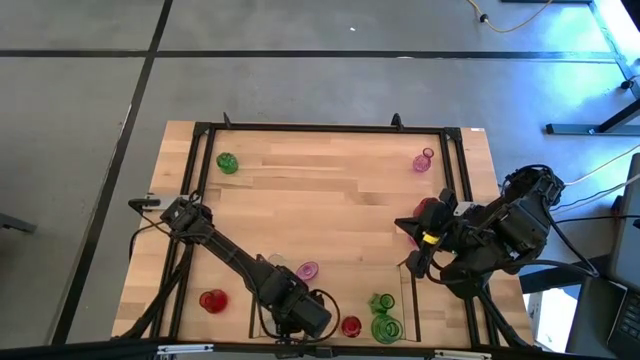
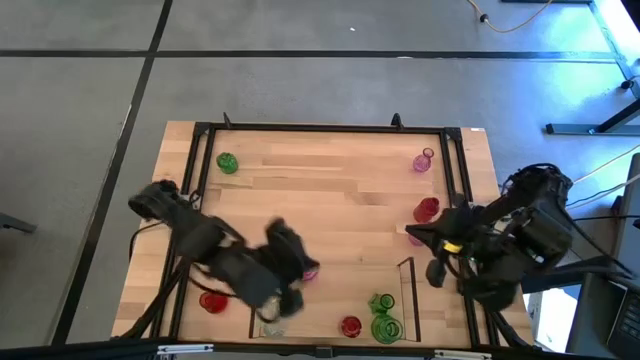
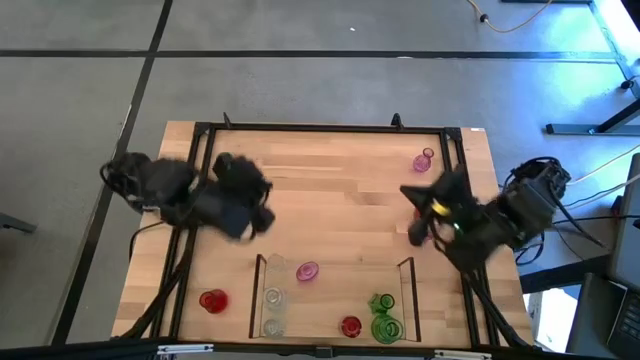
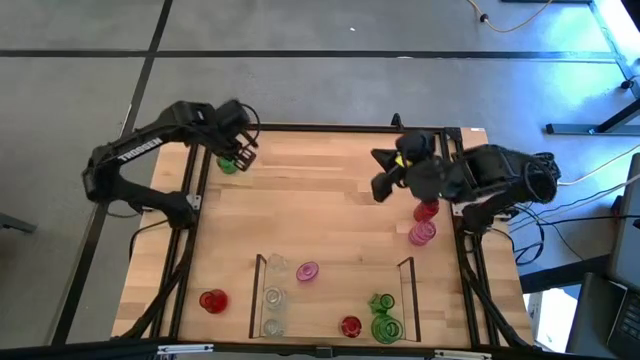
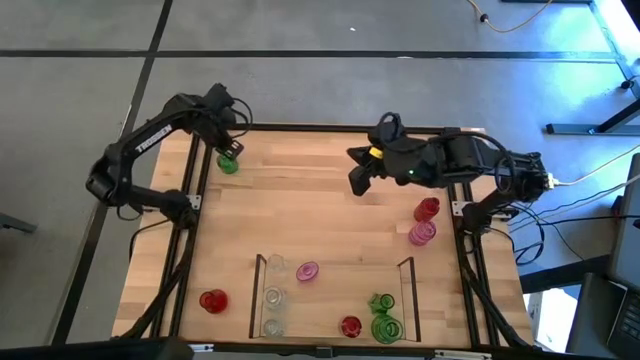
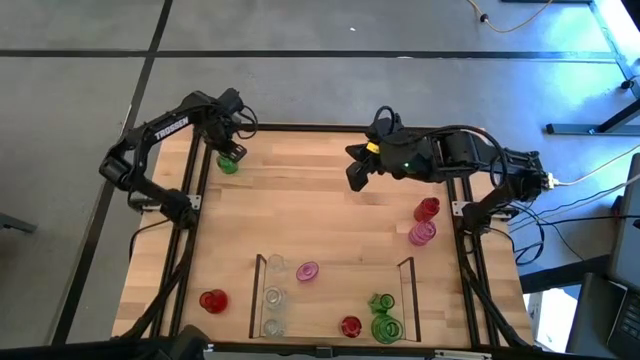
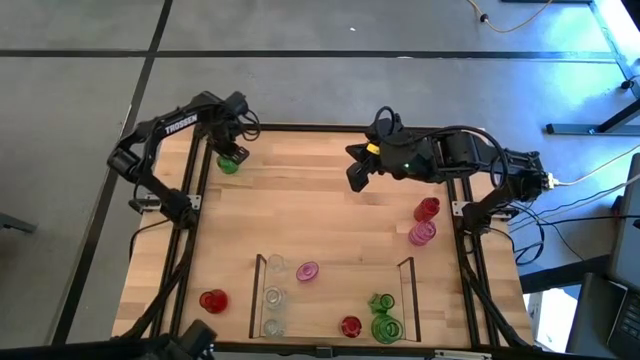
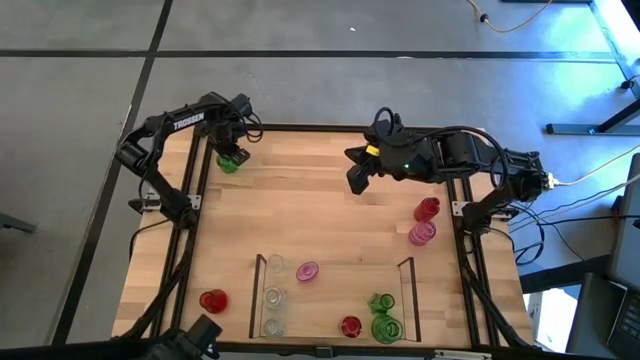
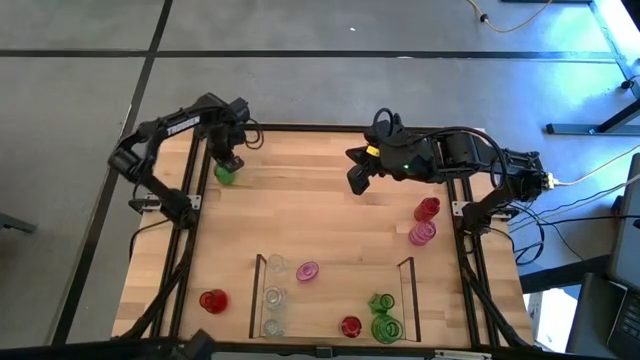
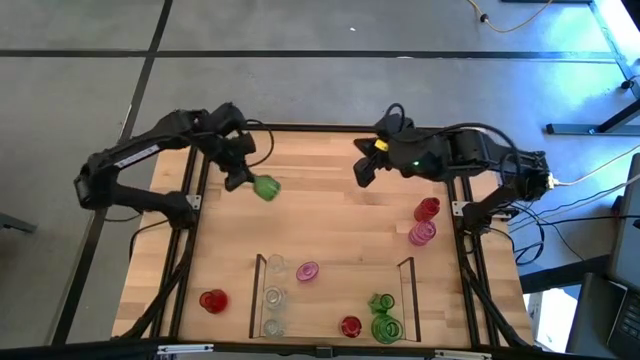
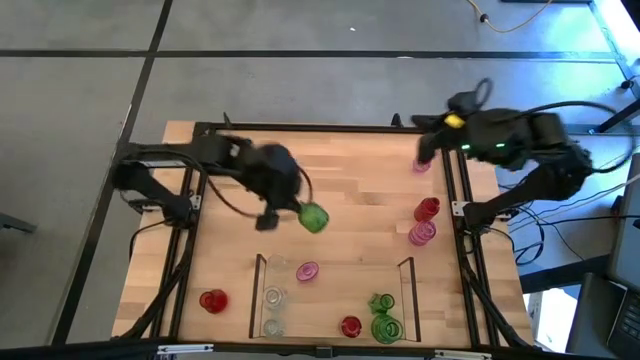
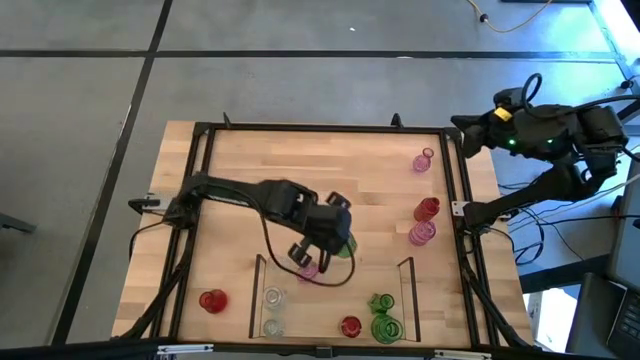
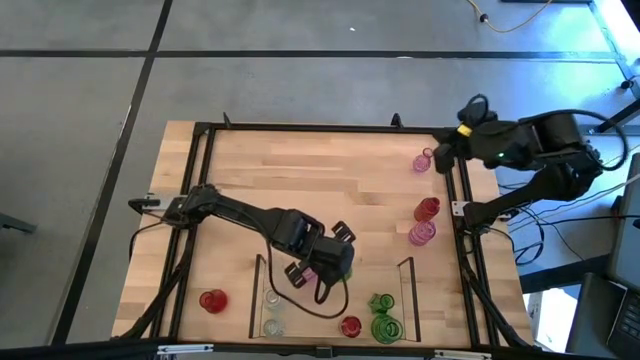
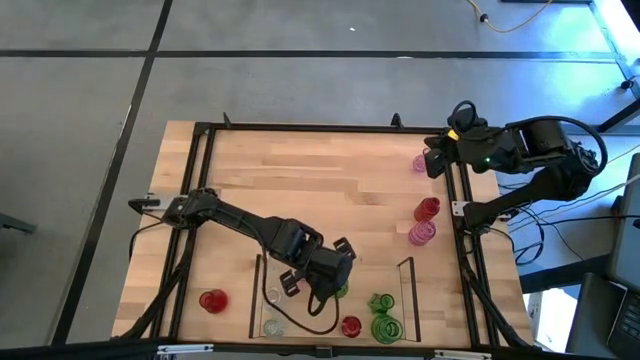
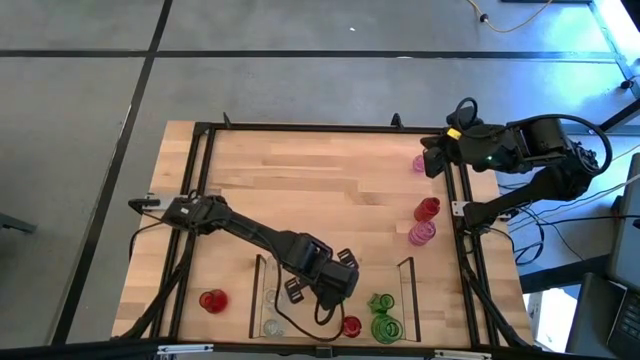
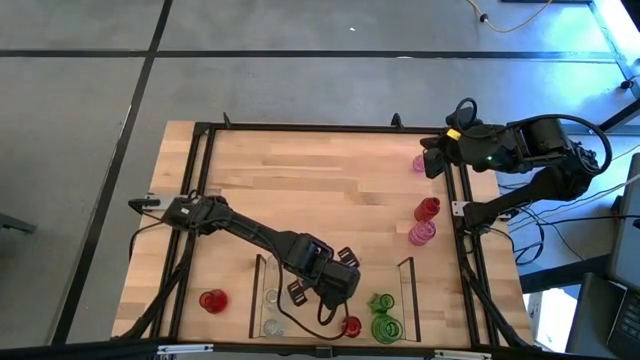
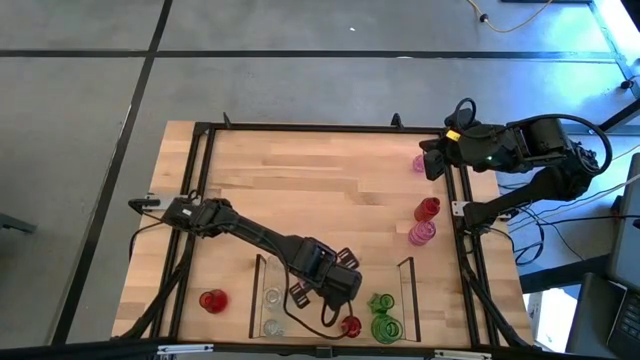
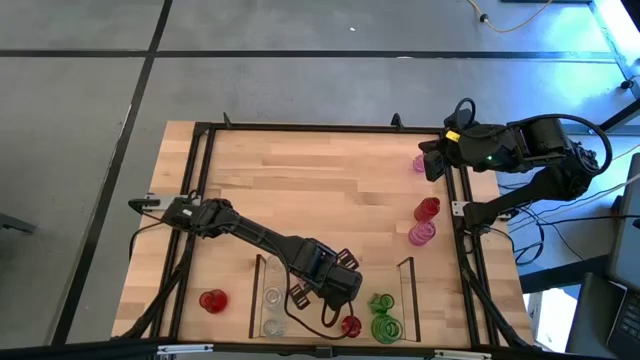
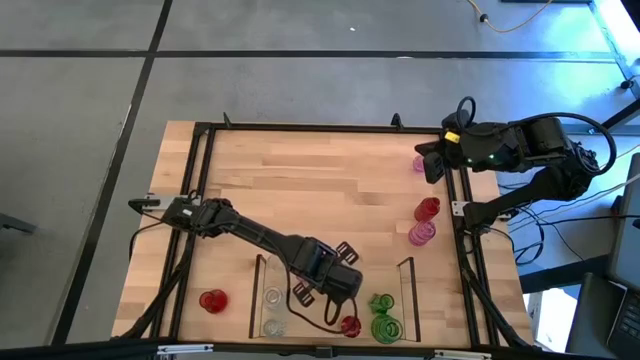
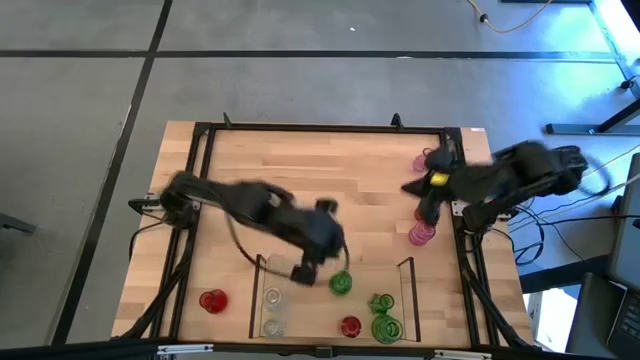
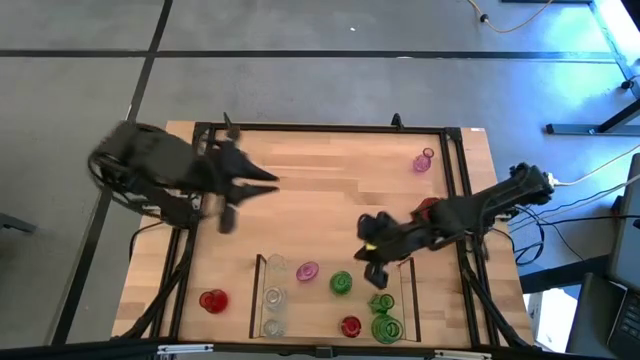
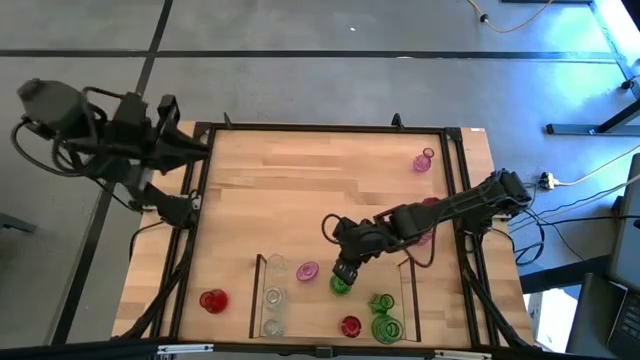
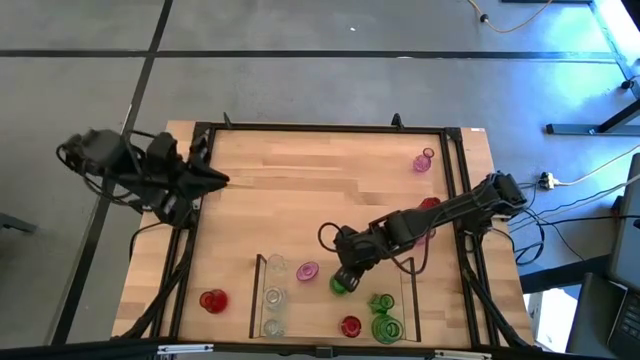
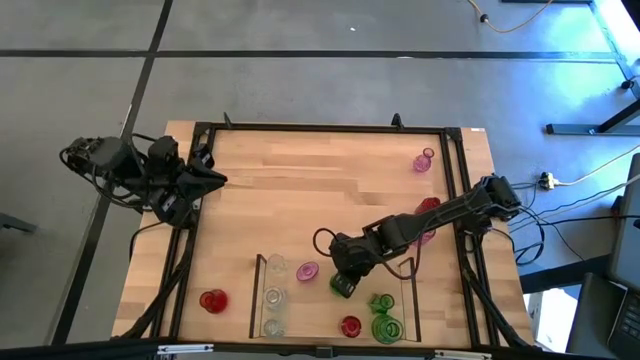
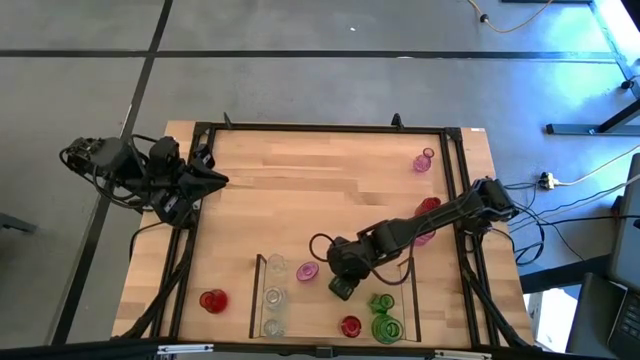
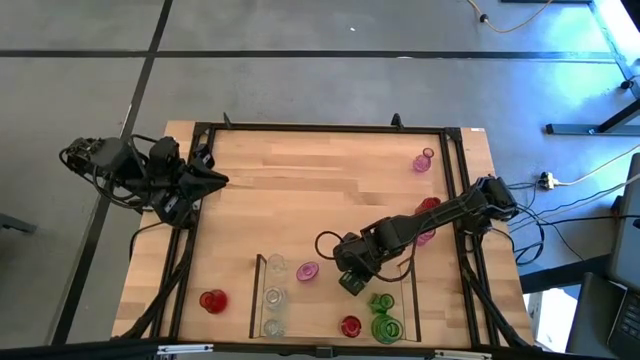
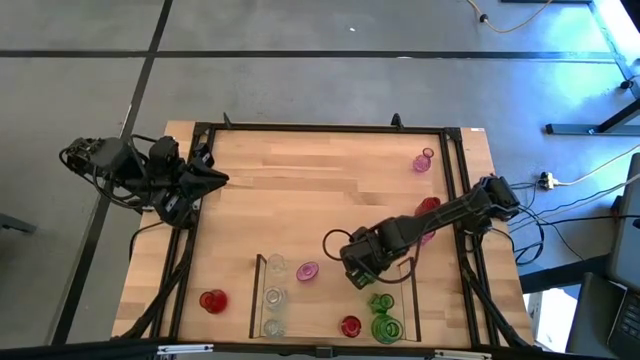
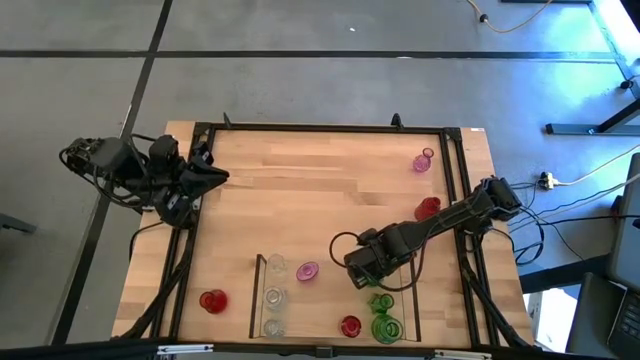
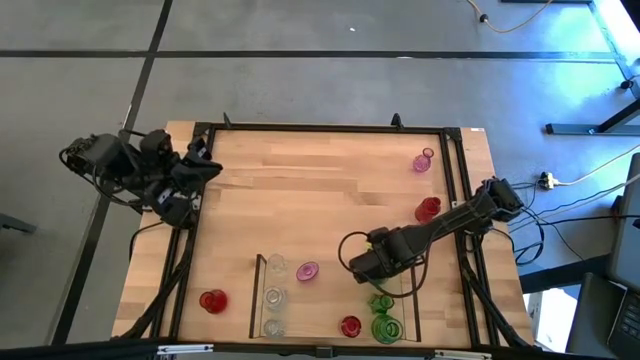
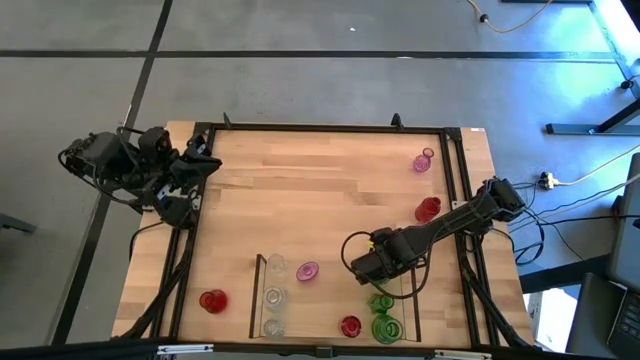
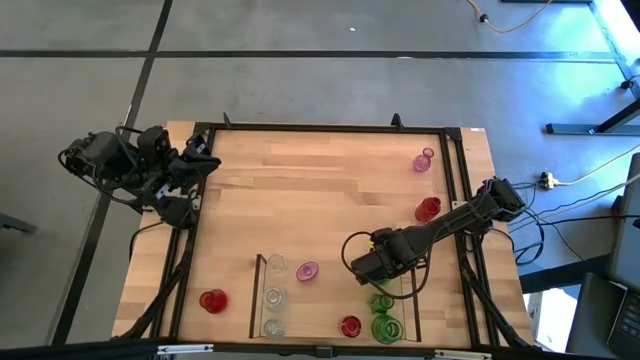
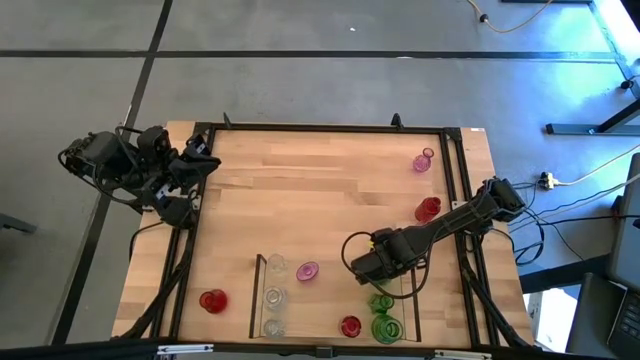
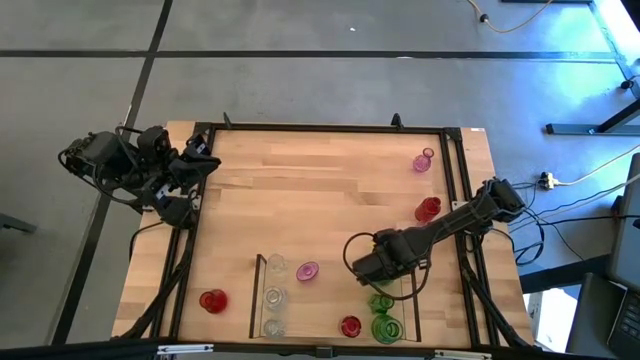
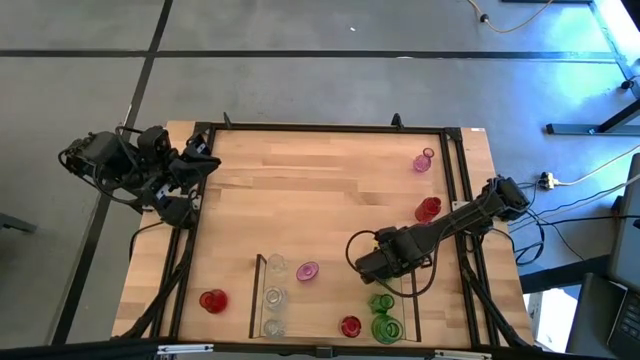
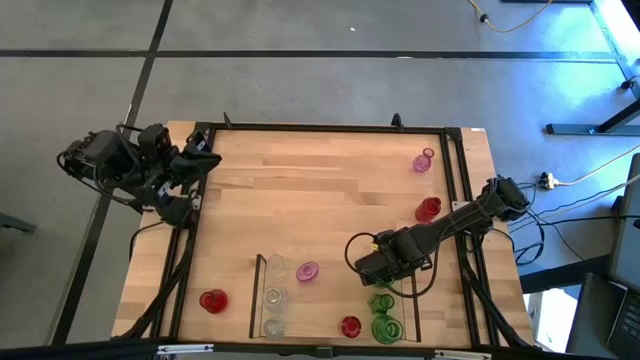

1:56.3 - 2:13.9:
Task: sort vases onto shelf
Put the green vase aligned with the other green vases on the shelf

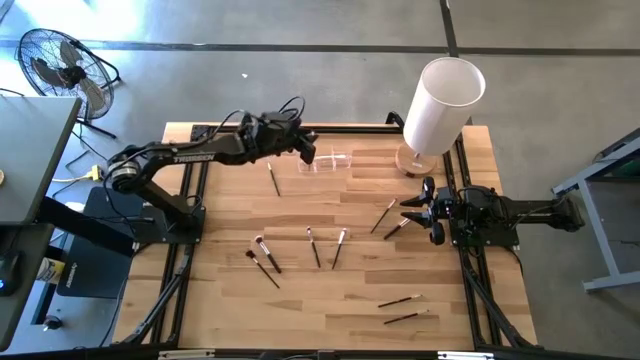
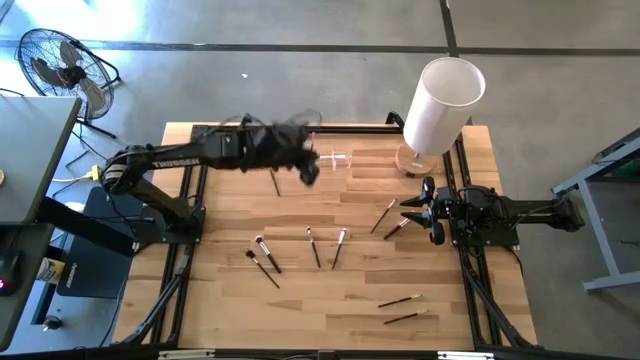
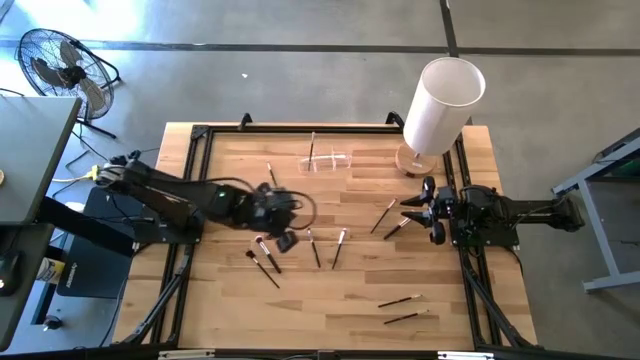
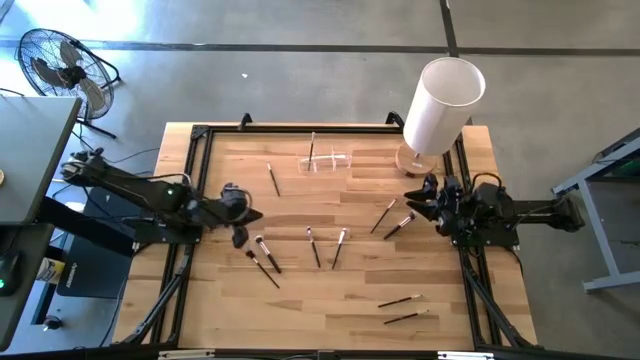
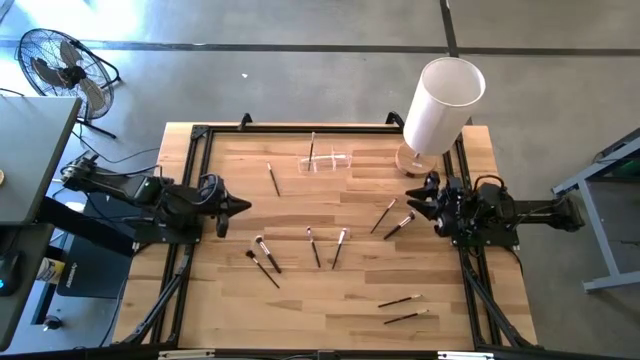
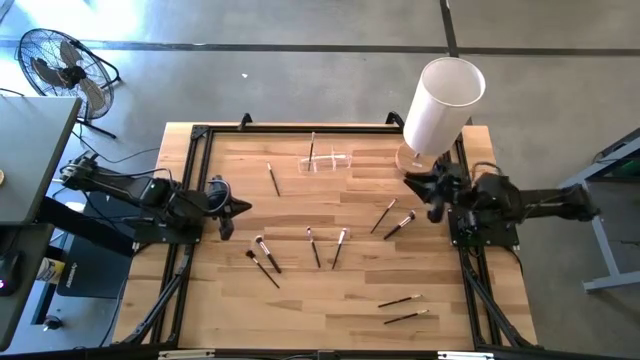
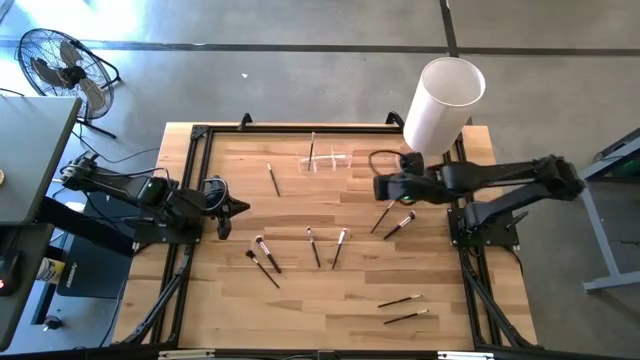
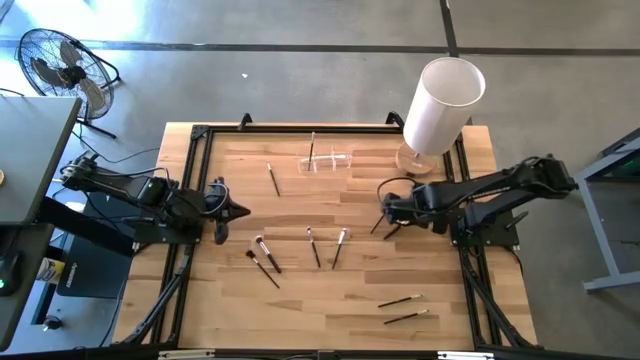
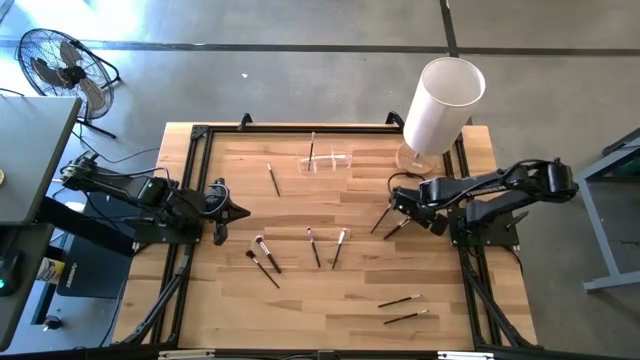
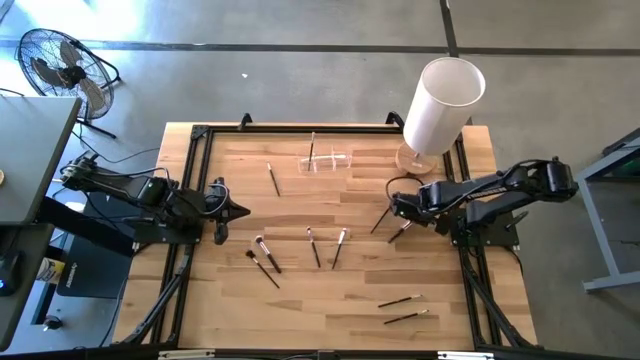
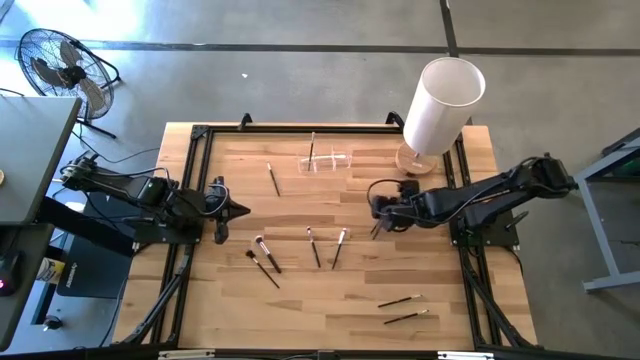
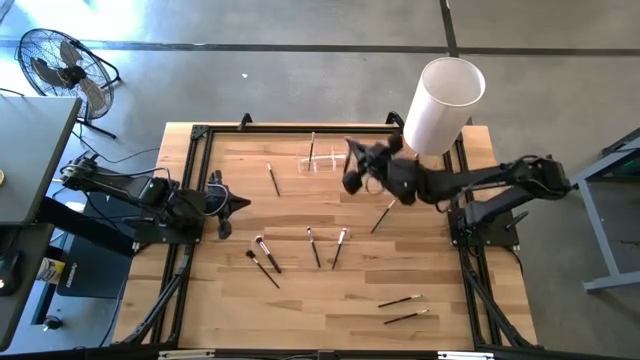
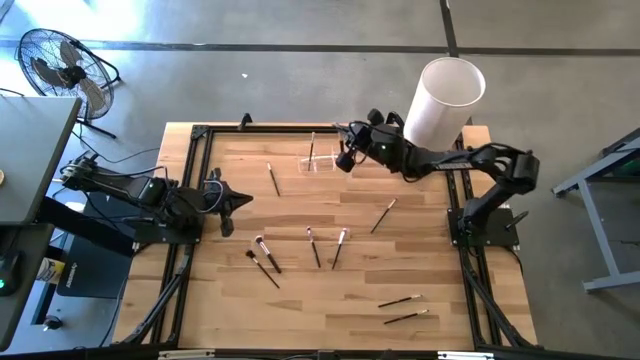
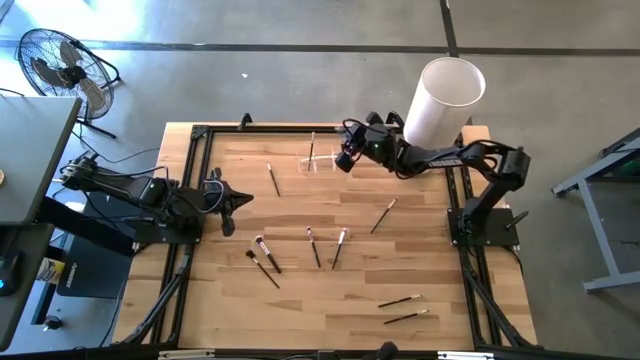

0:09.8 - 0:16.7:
Task: Pick & Place Makeup Brushes
Put the black powder brush into the transparent organizer
